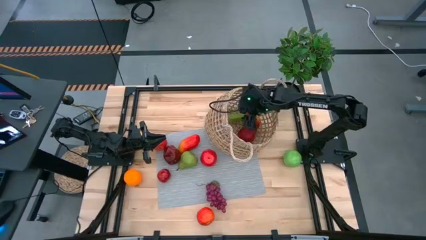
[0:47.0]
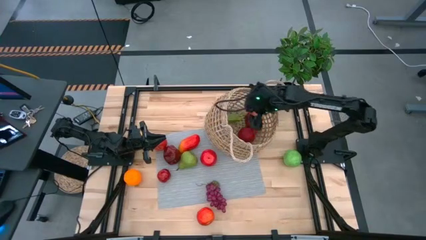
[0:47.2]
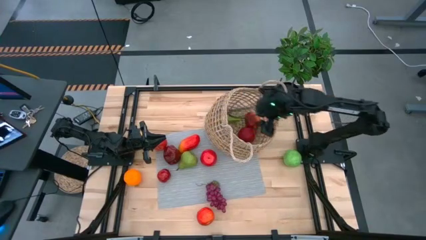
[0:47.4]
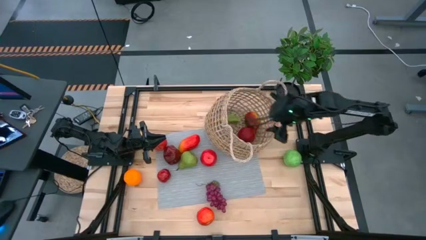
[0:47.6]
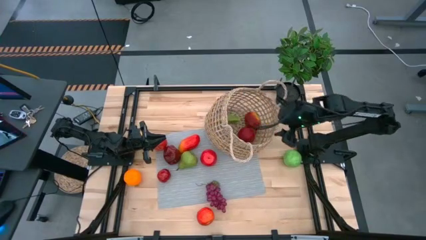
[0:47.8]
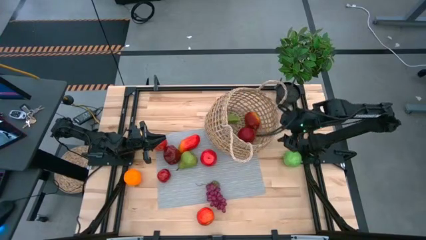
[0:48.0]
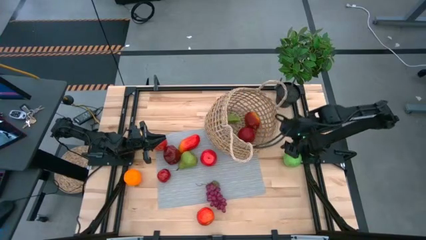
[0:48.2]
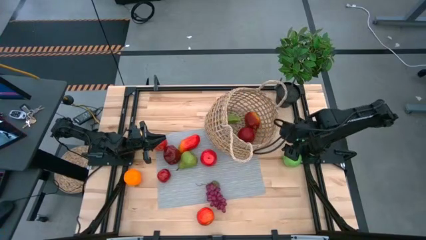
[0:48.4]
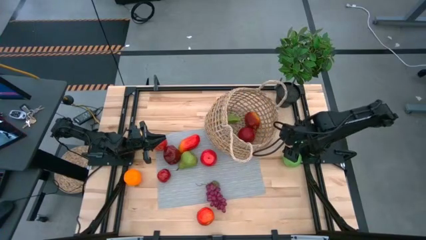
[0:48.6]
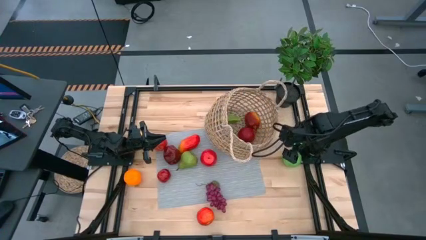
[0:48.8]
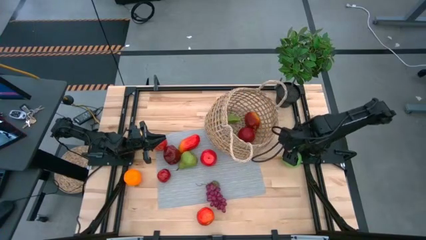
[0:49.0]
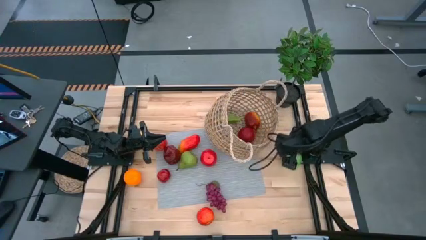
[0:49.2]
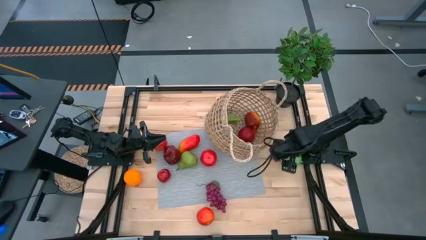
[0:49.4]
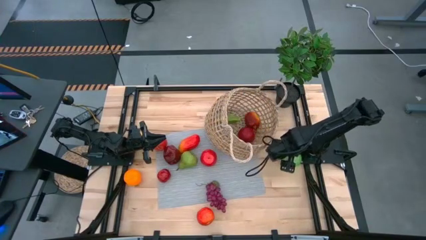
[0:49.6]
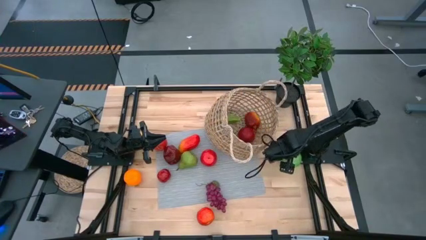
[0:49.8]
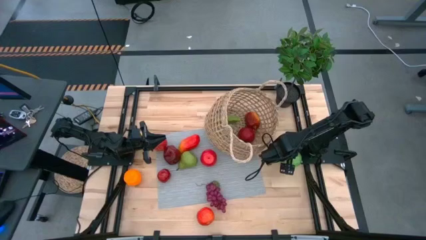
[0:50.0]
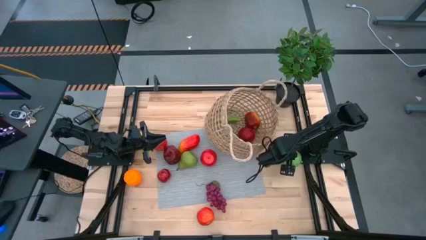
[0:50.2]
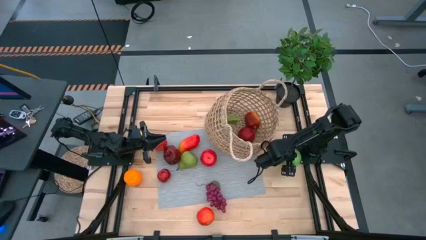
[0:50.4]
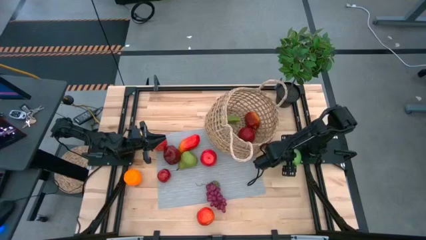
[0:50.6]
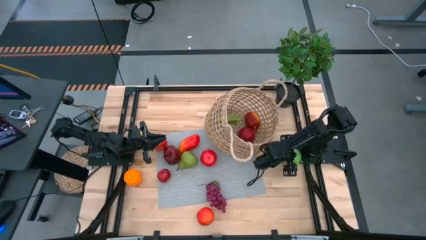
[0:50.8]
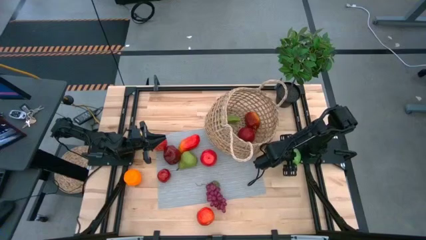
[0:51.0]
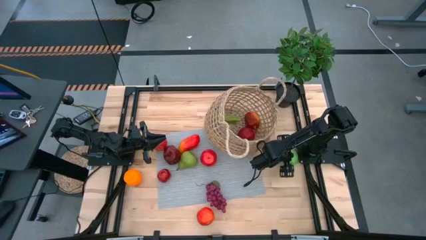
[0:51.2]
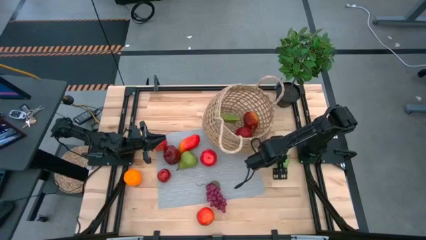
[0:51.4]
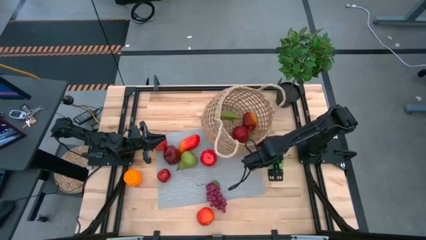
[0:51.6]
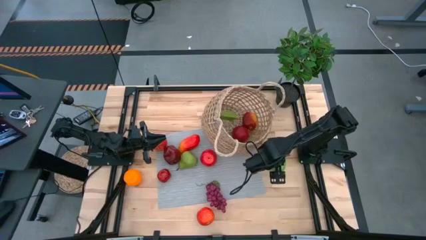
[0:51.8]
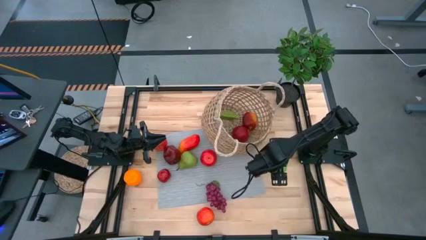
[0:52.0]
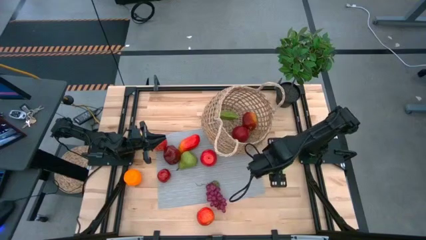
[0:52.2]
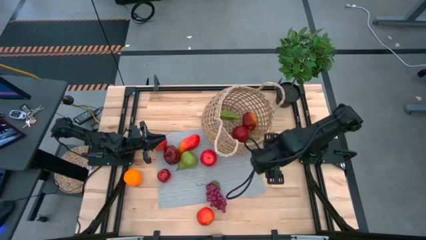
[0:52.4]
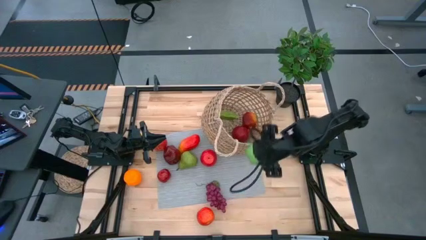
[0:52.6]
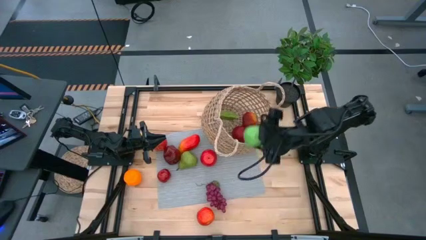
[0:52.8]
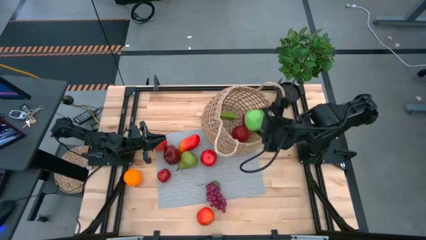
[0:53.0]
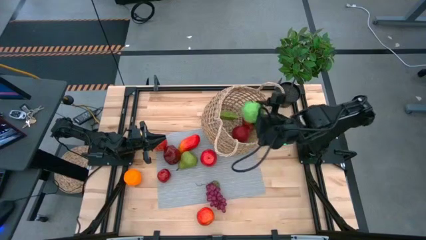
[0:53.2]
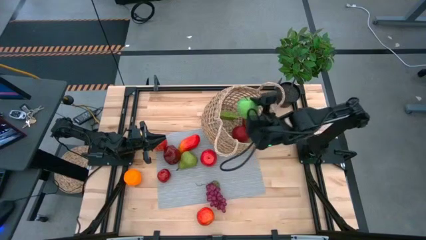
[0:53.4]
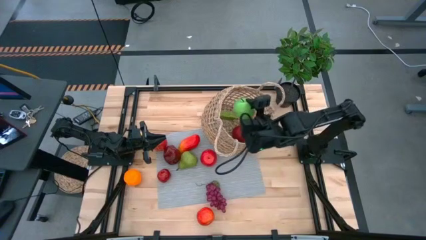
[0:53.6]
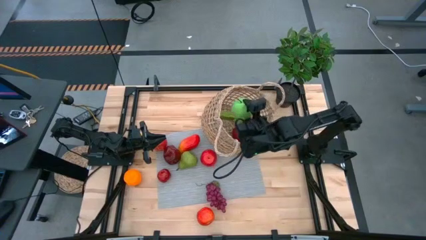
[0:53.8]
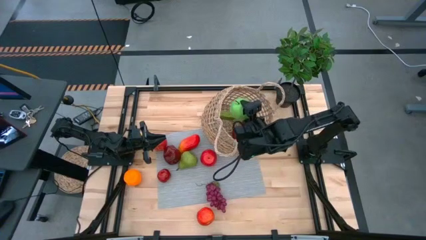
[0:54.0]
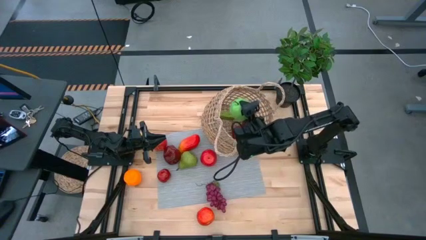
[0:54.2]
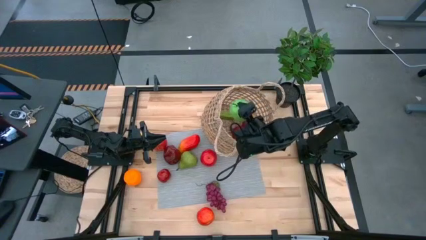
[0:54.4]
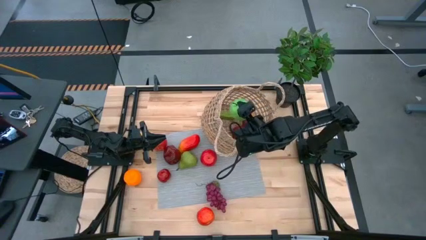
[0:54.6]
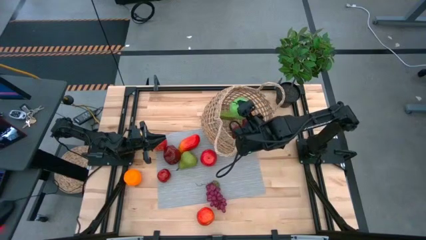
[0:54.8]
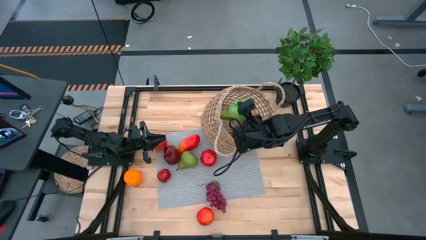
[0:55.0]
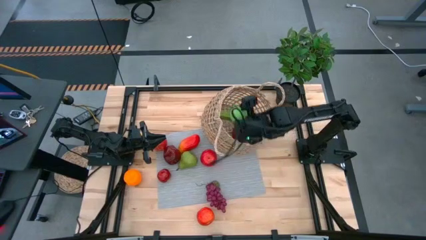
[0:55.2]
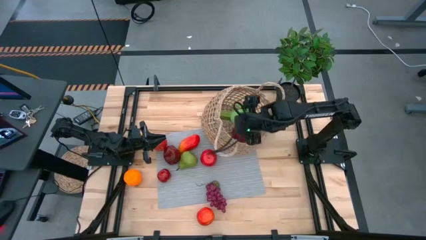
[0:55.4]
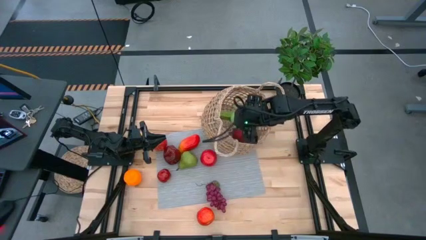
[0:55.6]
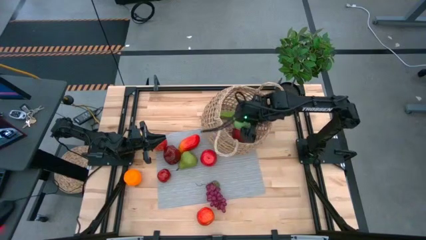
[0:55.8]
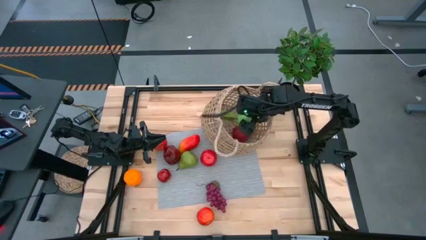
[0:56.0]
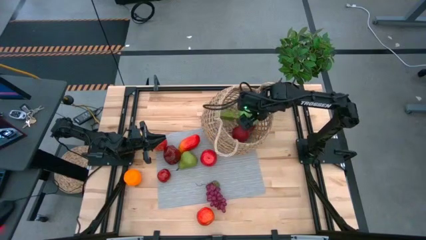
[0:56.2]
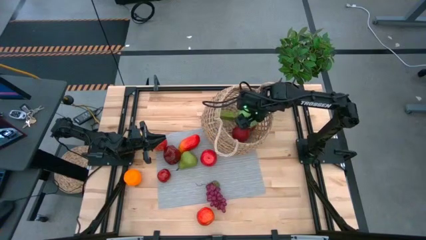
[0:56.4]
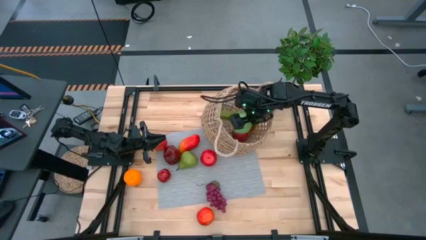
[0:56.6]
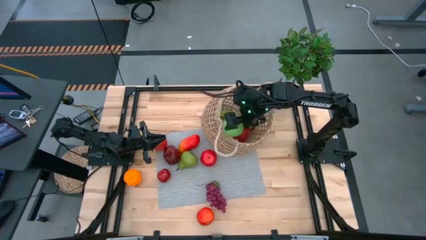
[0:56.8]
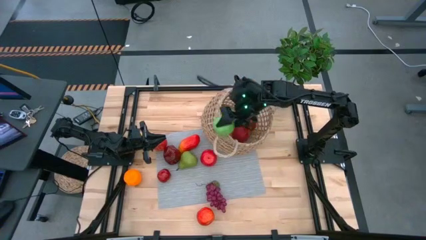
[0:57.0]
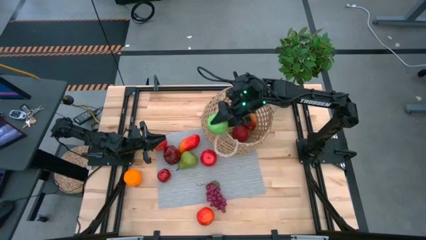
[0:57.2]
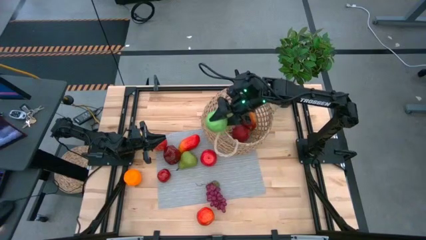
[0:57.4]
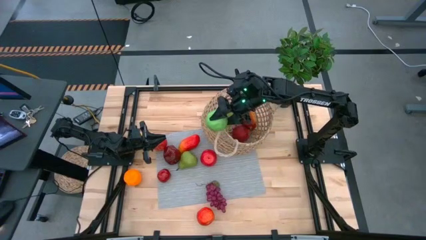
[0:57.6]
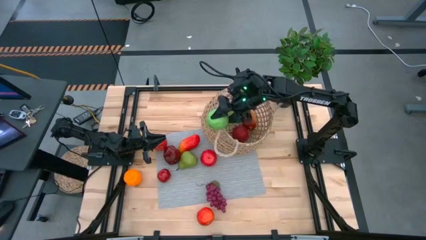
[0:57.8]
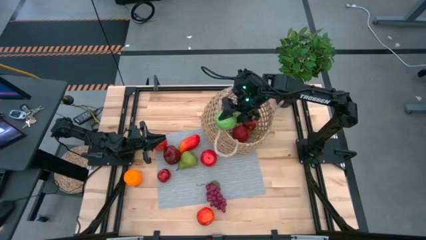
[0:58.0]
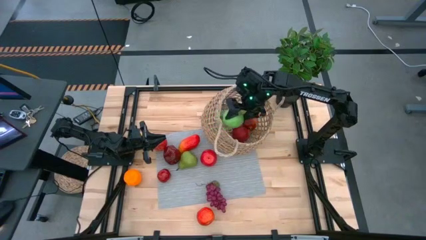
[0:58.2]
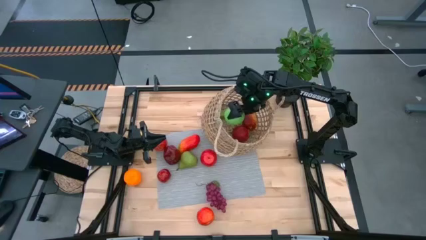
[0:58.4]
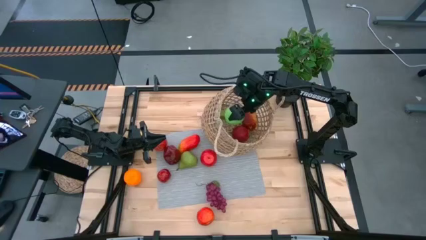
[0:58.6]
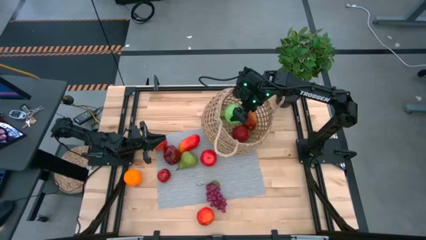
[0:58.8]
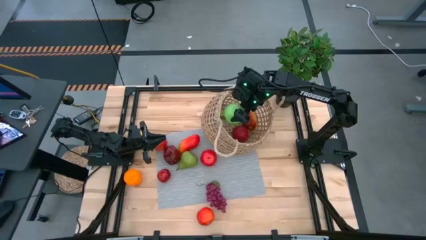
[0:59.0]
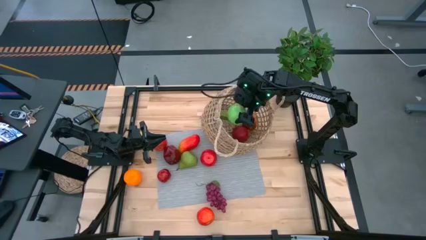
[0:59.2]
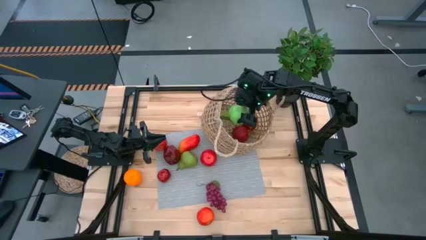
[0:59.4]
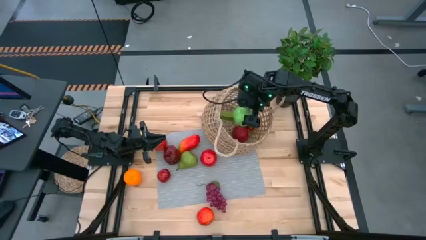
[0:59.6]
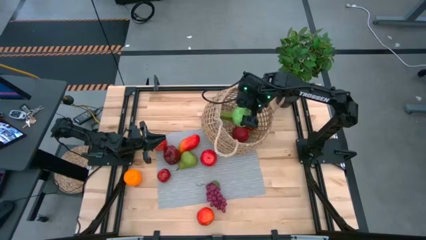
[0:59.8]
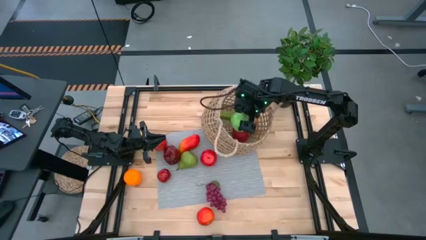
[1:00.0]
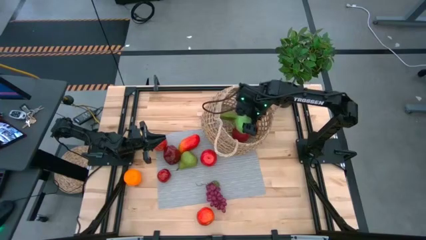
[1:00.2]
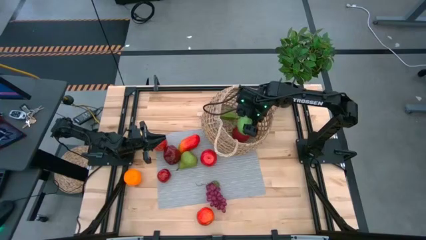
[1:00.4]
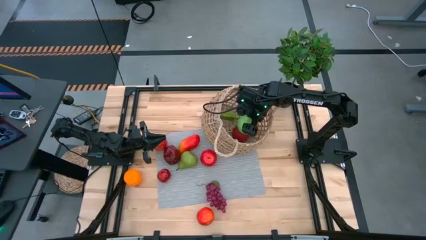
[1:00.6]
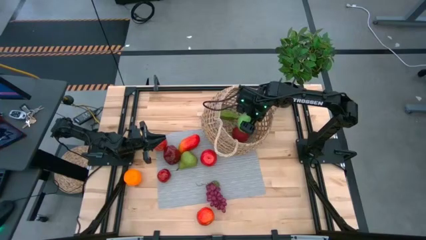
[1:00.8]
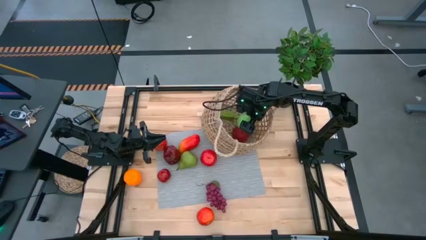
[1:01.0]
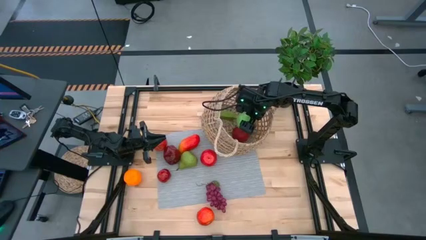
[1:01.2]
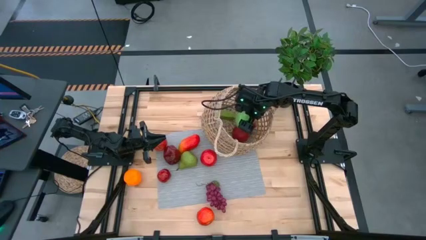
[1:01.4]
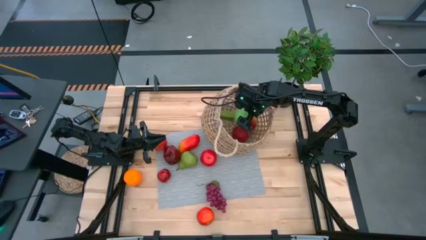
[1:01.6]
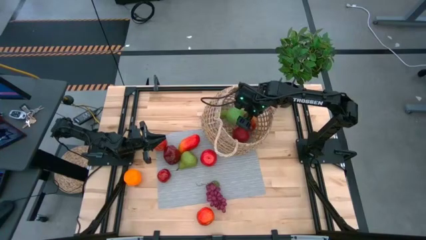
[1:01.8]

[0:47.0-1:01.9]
Task: Build produce basket
Put the green apple into the brown basket

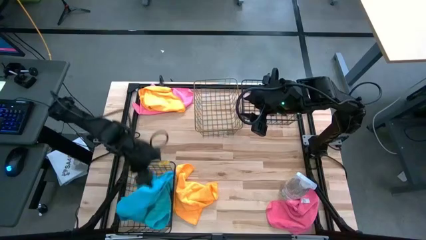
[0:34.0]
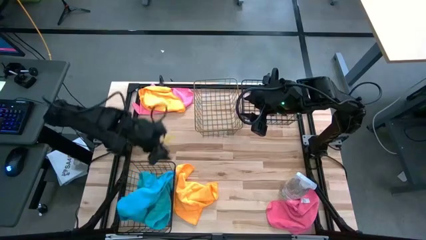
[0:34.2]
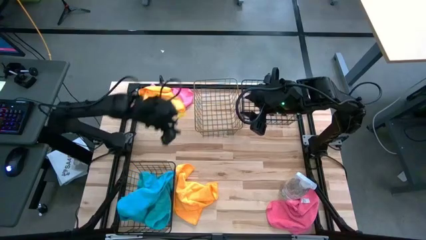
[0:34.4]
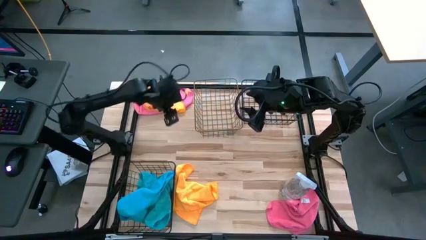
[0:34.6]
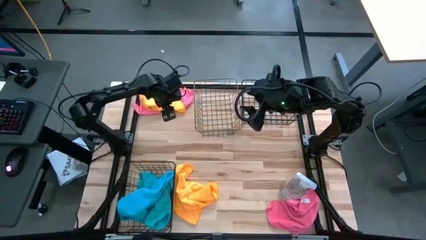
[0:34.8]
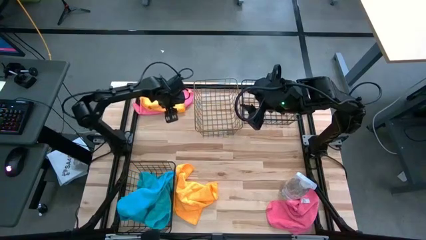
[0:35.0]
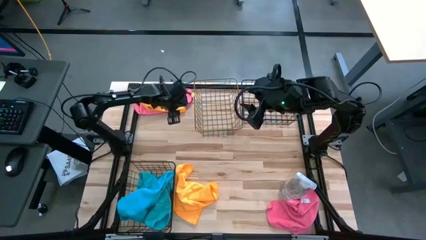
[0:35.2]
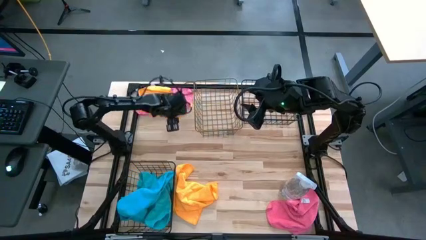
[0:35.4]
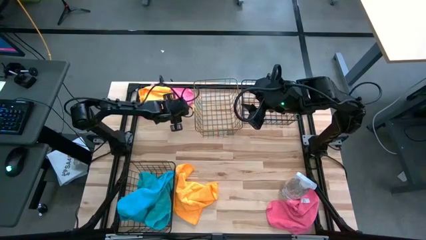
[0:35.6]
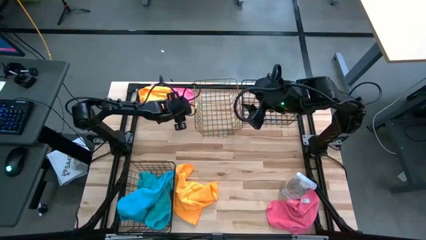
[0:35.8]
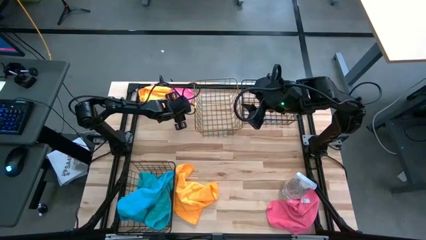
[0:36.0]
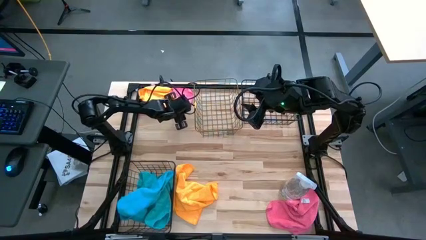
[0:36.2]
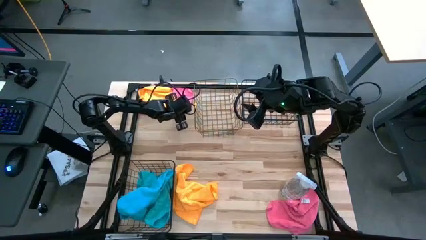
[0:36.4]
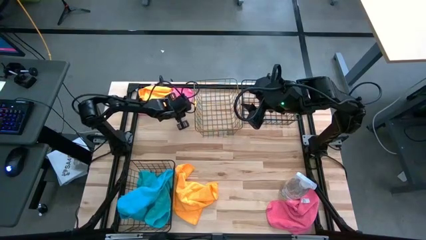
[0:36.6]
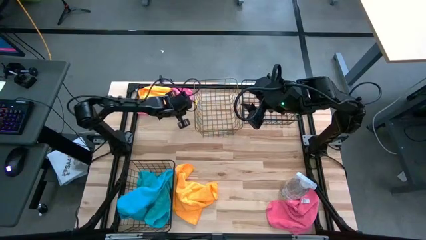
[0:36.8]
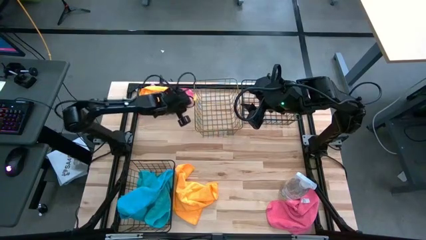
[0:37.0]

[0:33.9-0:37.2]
Task: Sort microfiber towel by color & place in baskets
Put the top yellow towel into the gold wire basket
